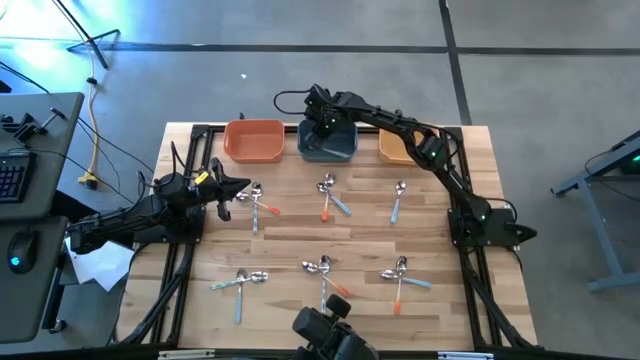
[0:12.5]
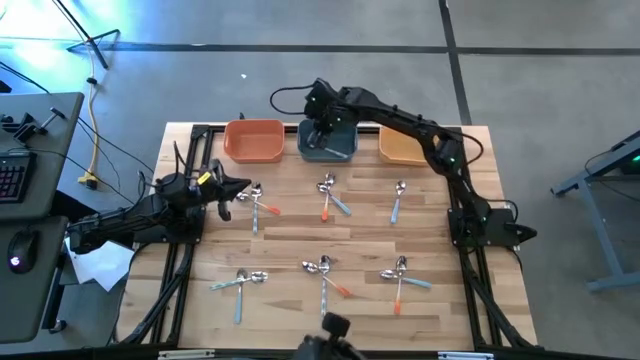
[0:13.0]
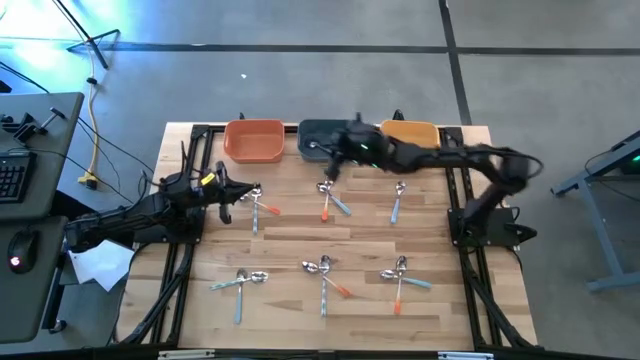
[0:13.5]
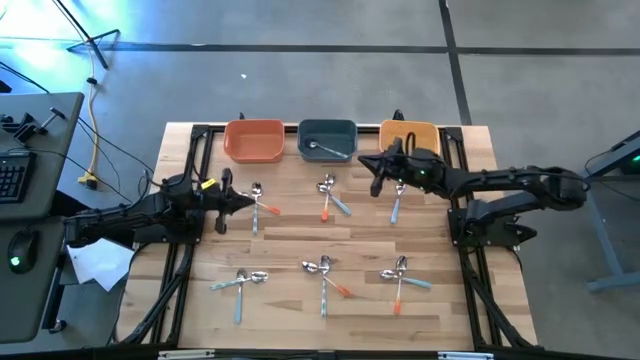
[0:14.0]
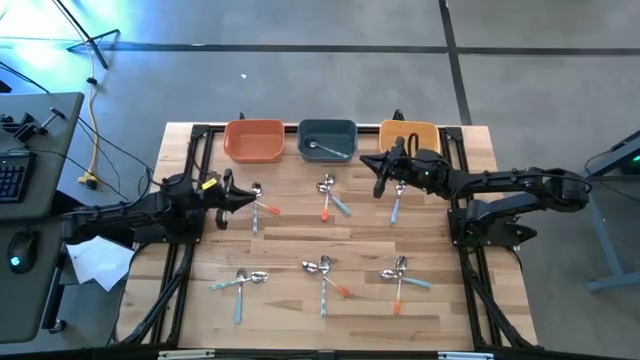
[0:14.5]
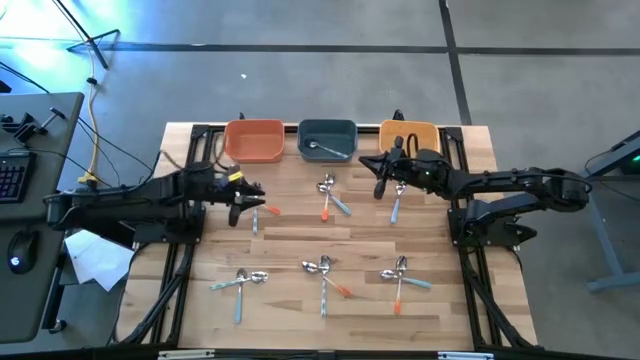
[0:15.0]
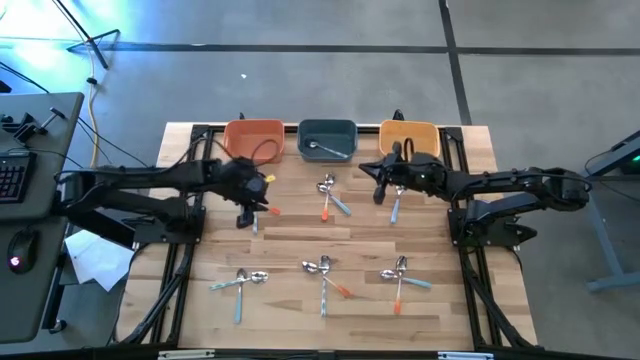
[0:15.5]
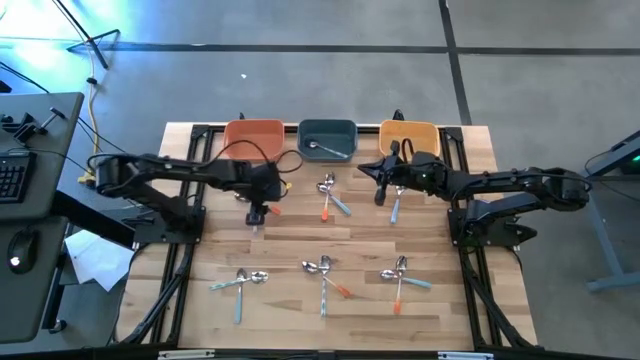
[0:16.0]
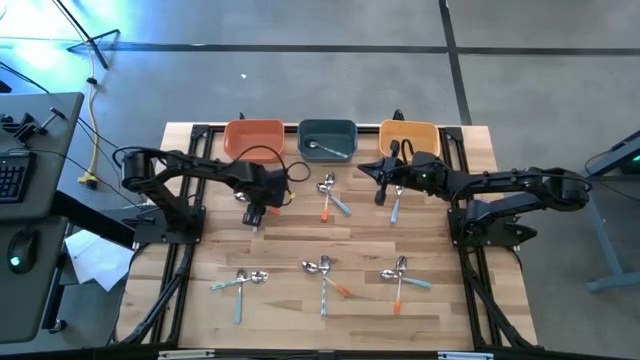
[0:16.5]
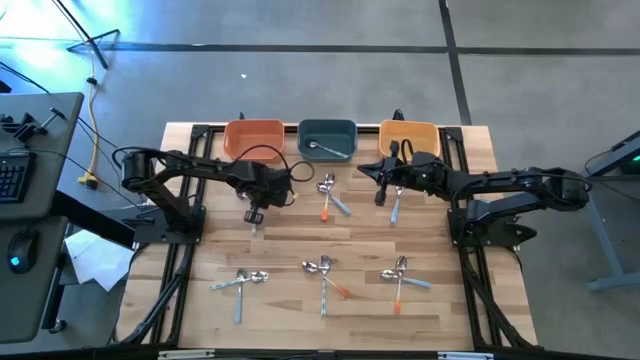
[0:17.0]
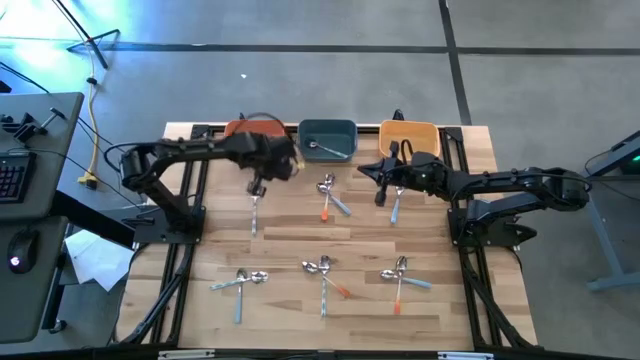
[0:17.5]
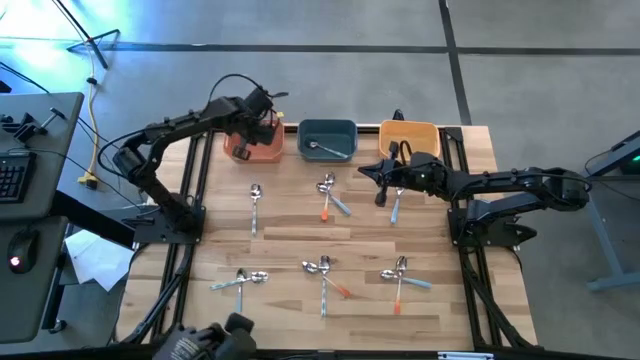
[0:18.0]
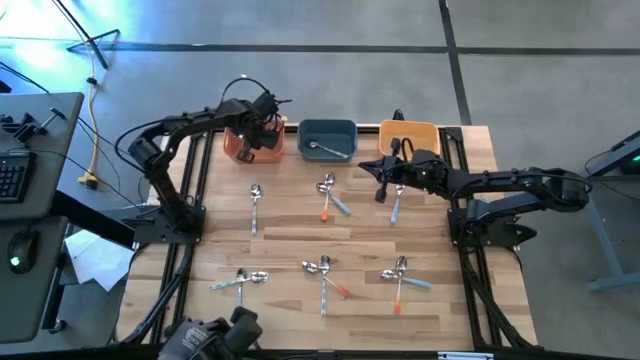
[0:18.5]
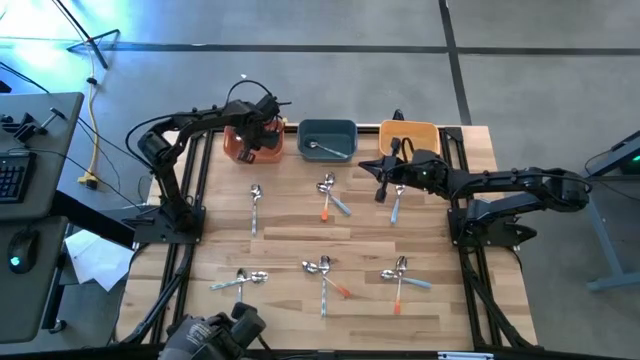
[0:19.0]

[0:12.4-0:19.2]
Task: Sort silverware by color (type)
Put the orange spoon into the orange bin

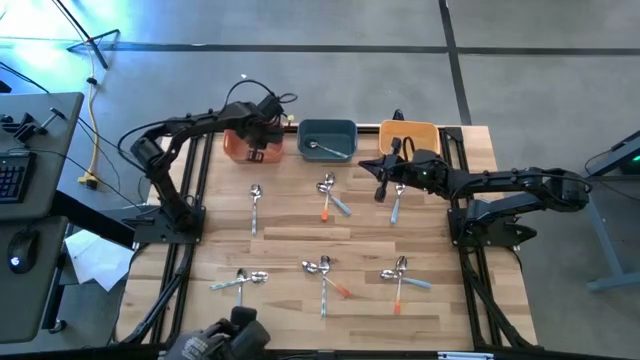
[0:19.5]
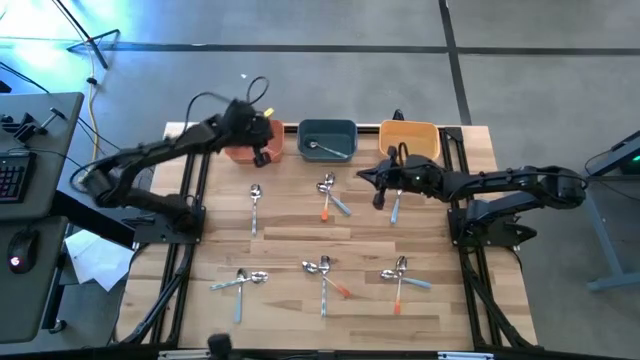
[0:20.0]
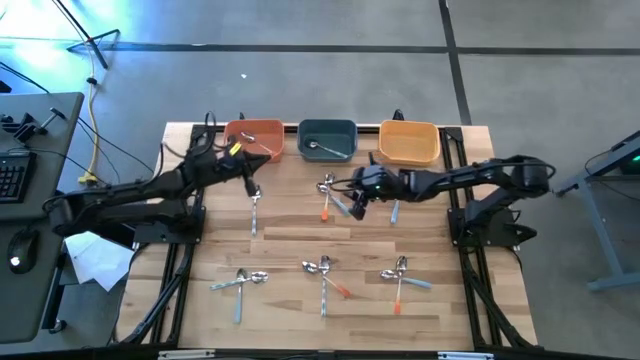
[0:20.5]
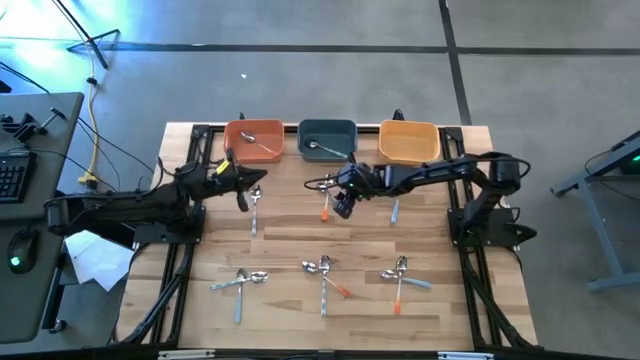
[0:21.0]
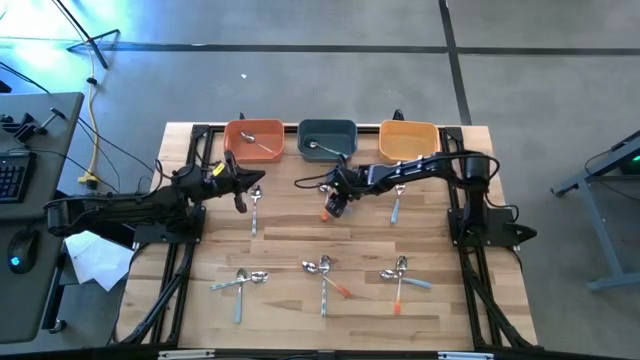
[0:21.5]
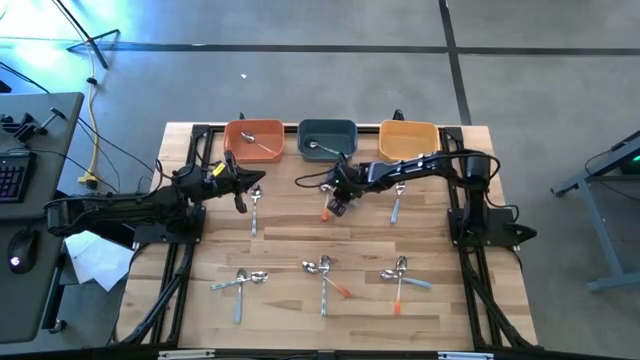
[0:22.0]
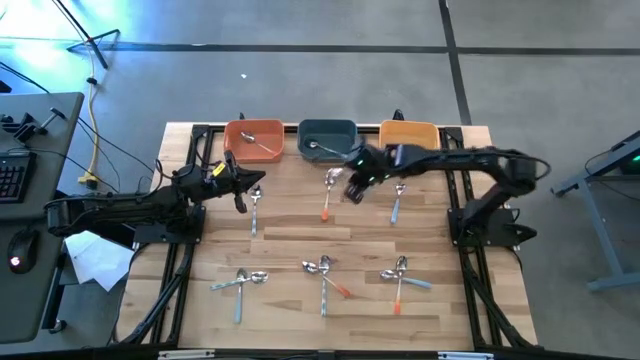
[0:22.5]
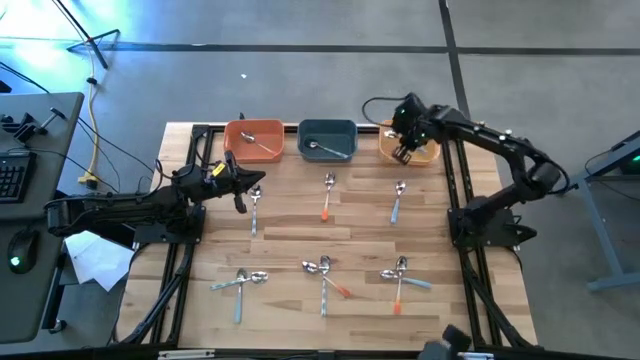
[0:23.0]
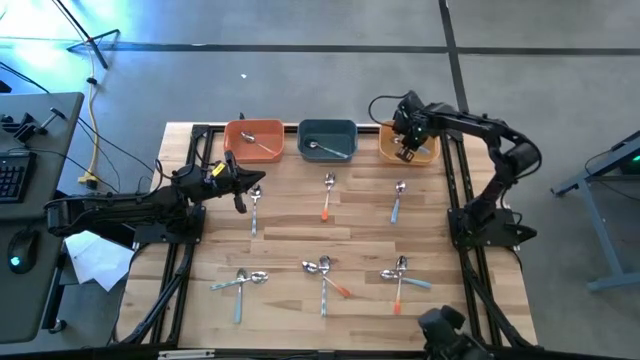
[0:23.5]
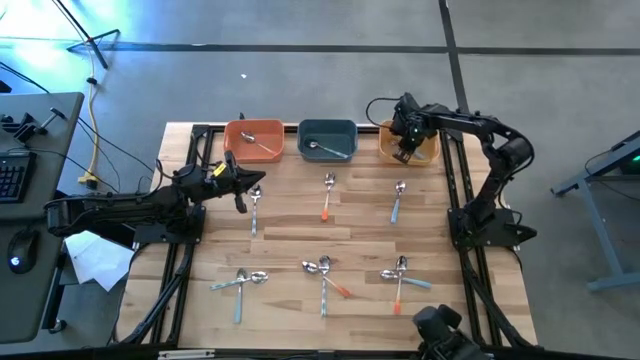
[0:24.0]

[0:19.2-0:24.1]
Put the blue spoon into the yellow bin

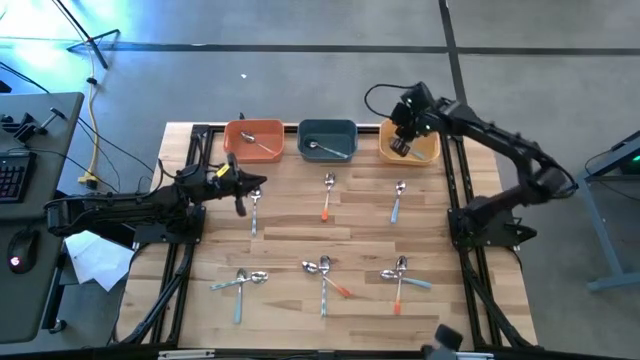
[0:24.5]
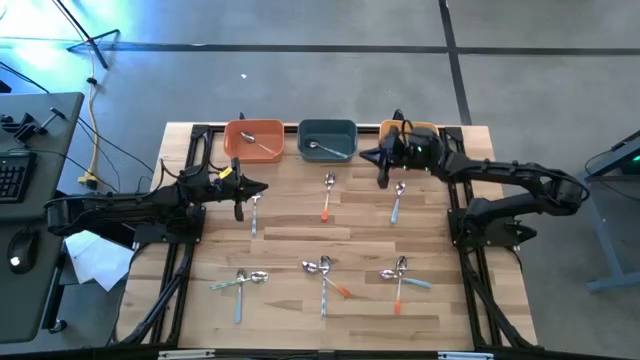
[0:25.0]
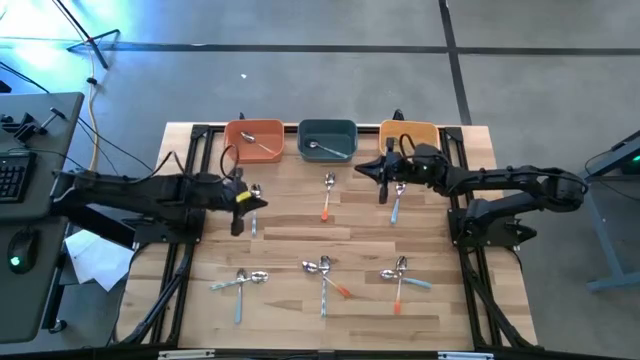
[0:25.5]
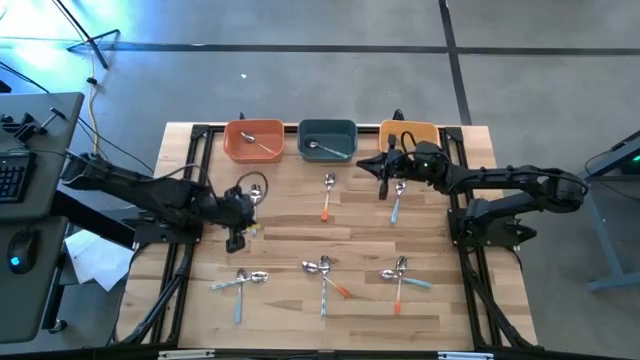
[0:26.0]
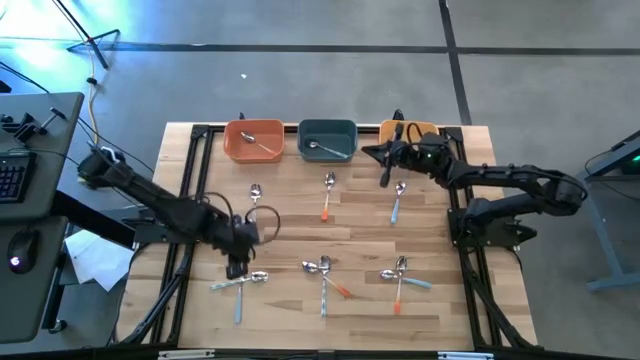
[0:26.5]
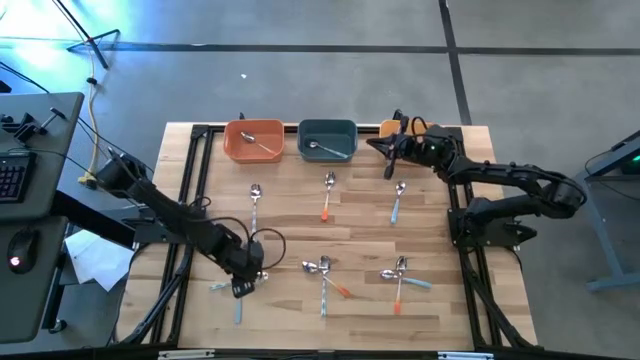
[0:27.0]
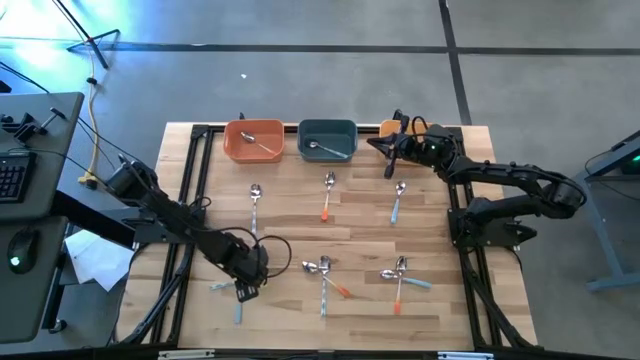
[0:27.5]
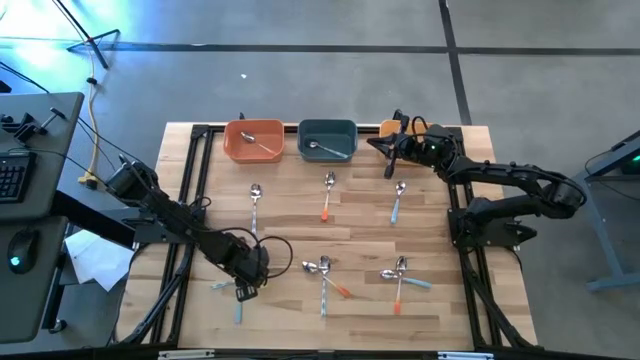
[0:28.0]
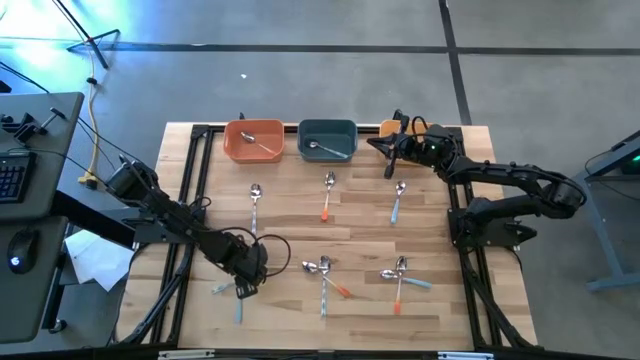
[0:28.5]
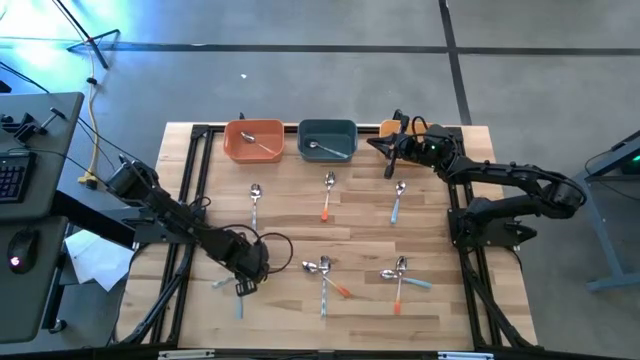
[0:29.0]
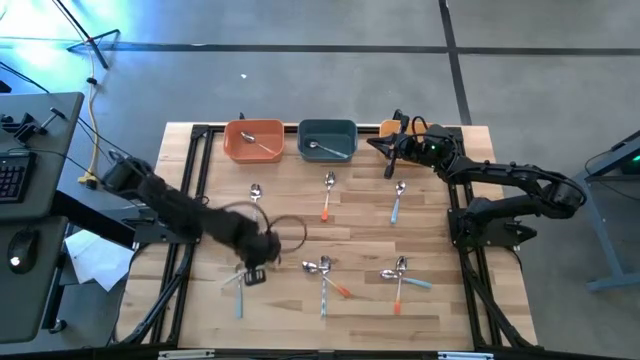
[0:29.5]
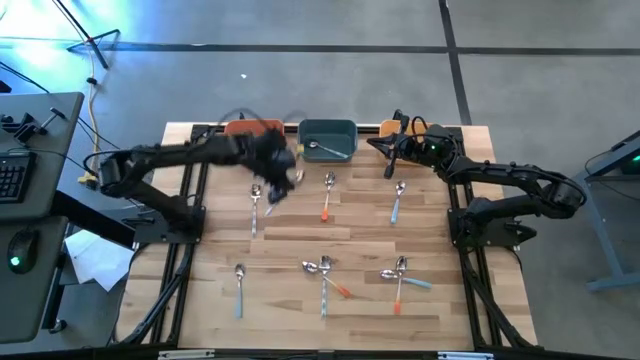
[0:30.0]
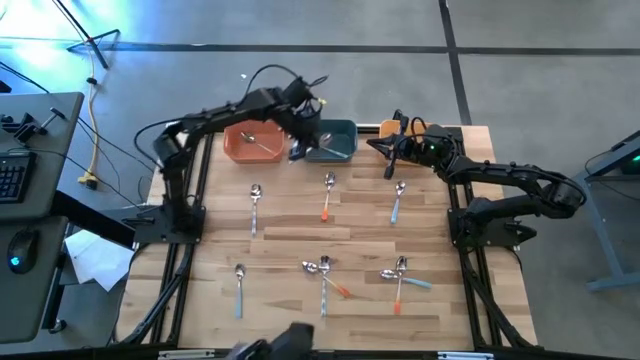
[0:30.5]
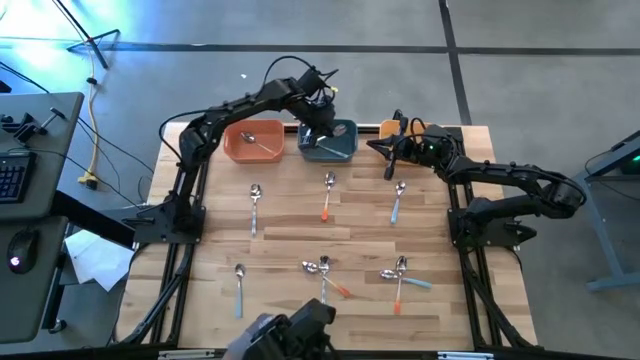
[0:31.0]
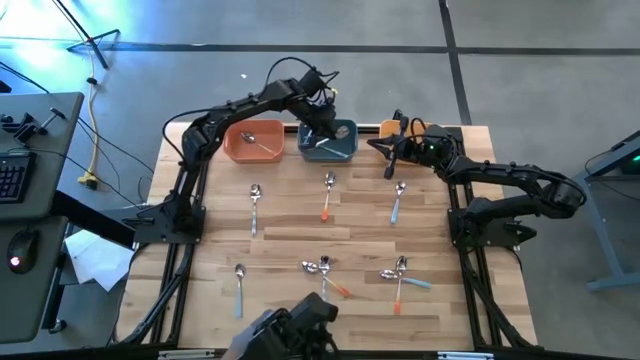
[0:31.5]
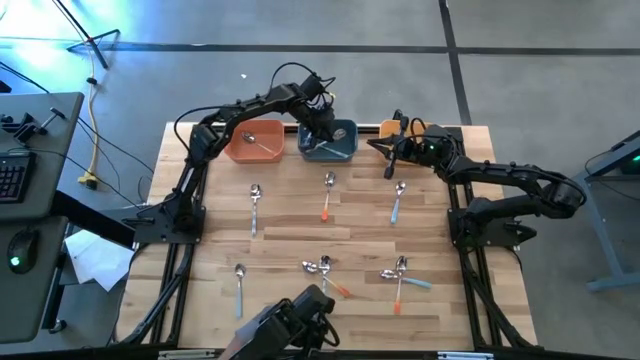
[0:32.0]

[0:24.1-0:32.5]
Put the white spoon into the blue bin

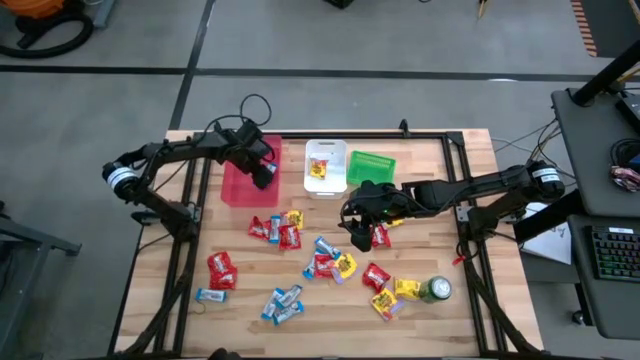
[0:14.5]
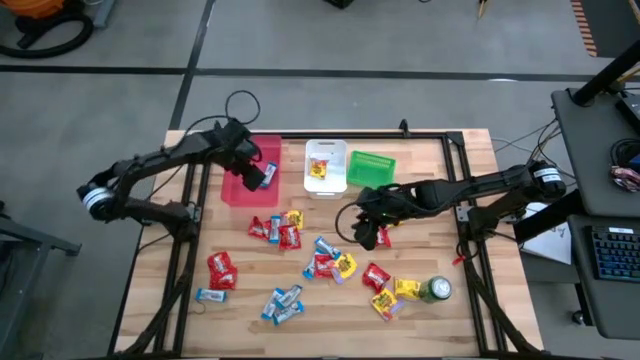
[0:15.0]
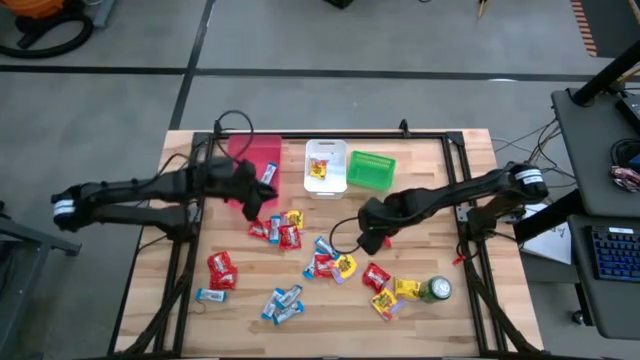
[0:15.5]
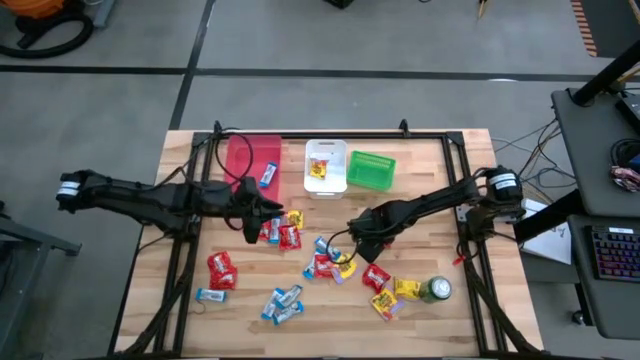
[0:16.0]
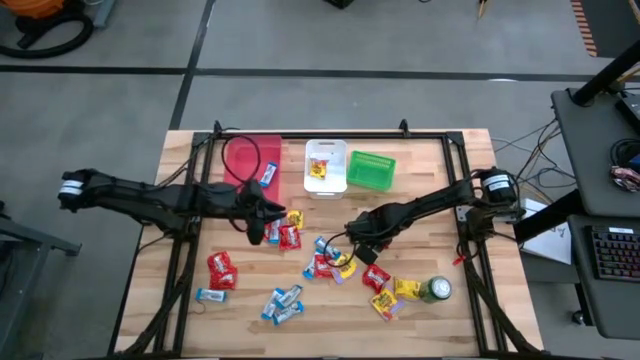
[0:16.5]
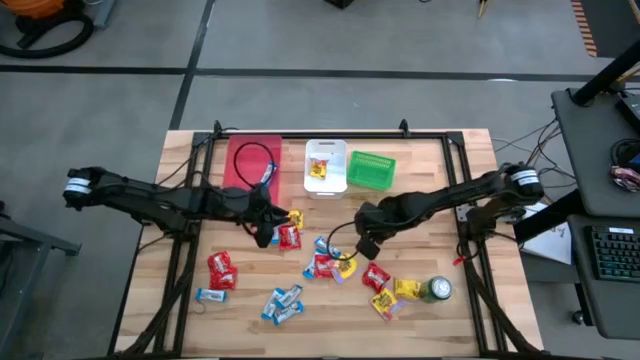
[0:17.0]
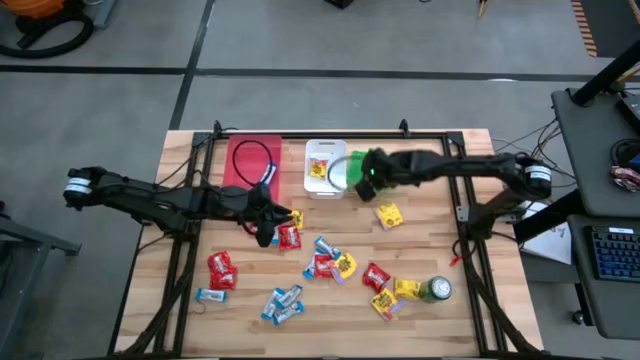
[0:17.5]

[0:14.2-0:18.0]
Task: Sort candy
Put the red candy into the green bin
